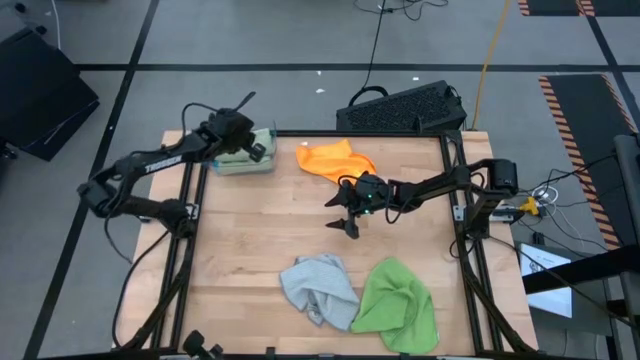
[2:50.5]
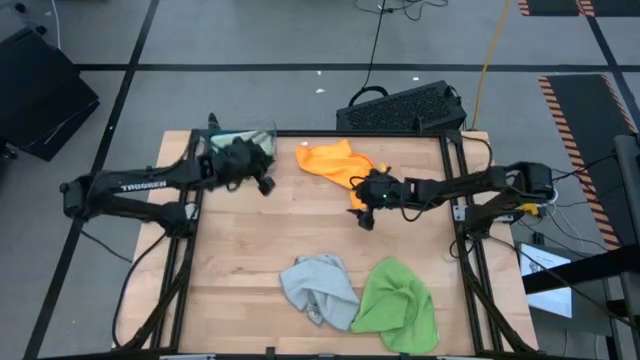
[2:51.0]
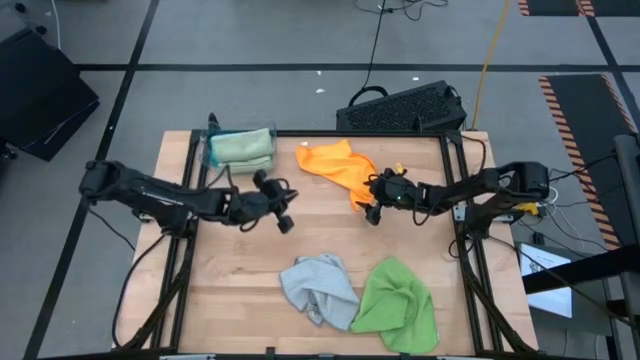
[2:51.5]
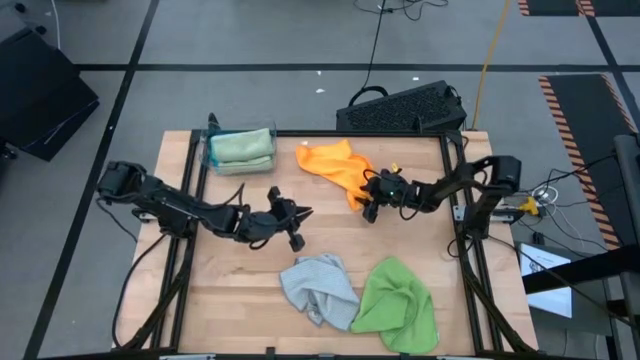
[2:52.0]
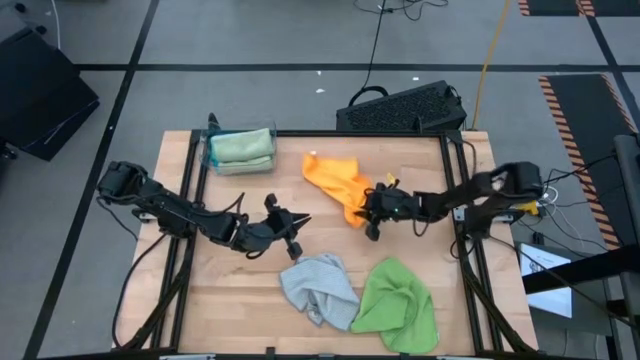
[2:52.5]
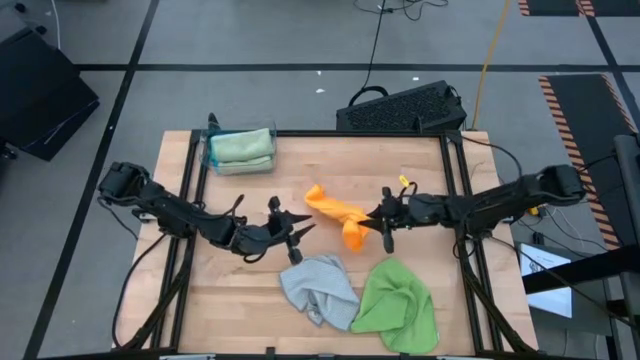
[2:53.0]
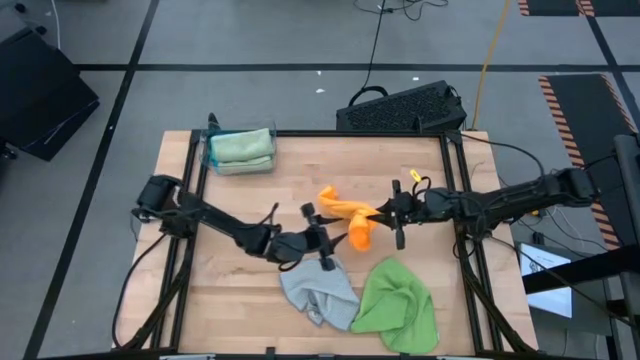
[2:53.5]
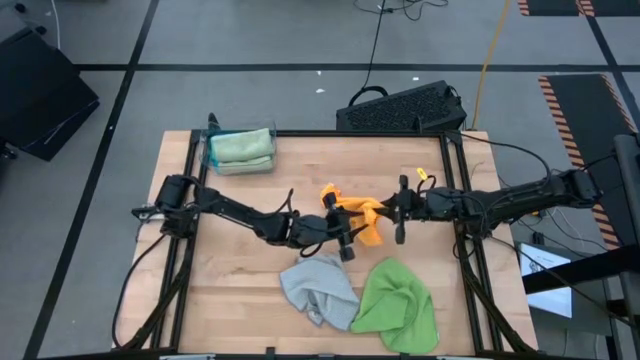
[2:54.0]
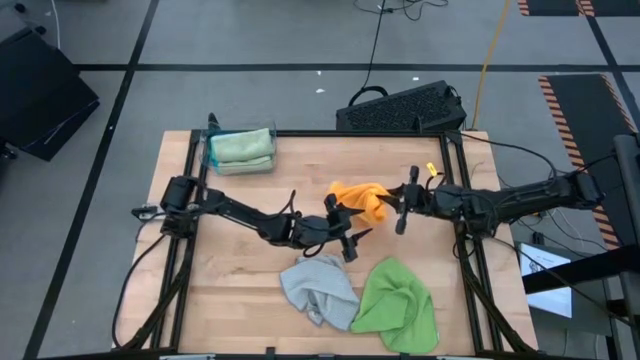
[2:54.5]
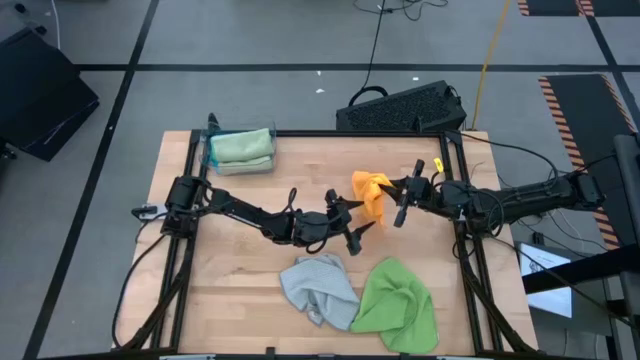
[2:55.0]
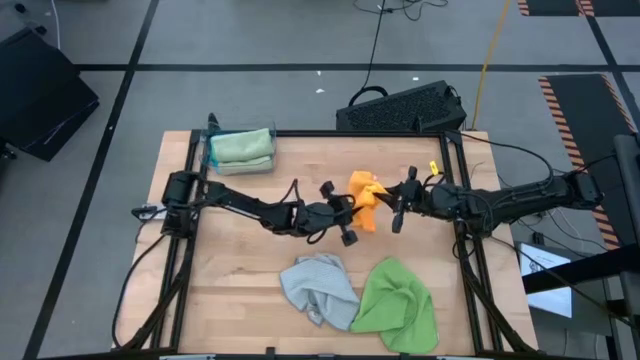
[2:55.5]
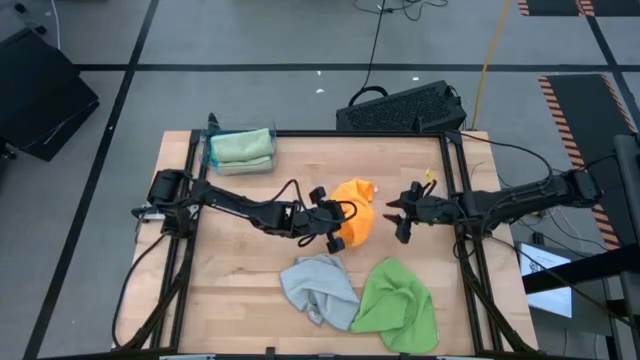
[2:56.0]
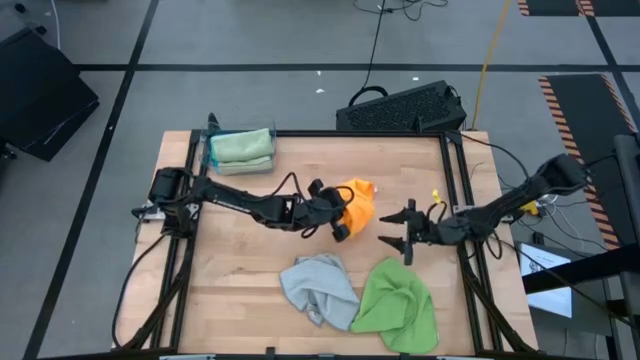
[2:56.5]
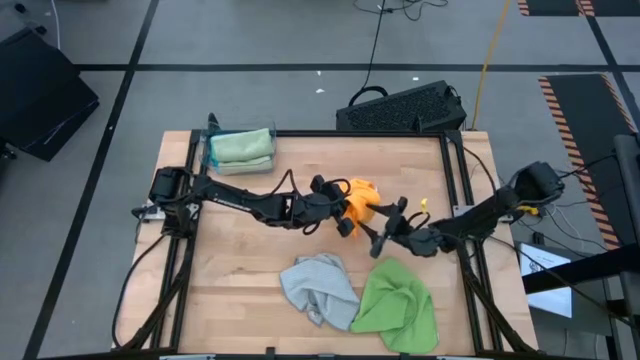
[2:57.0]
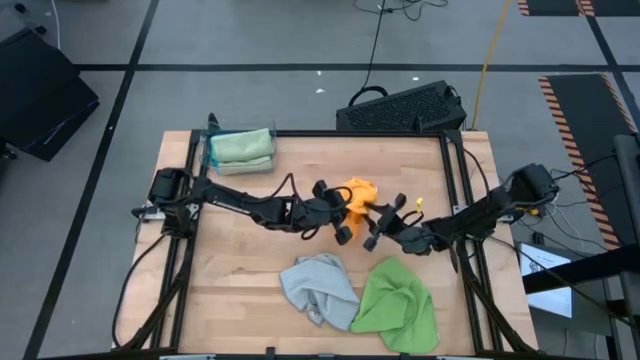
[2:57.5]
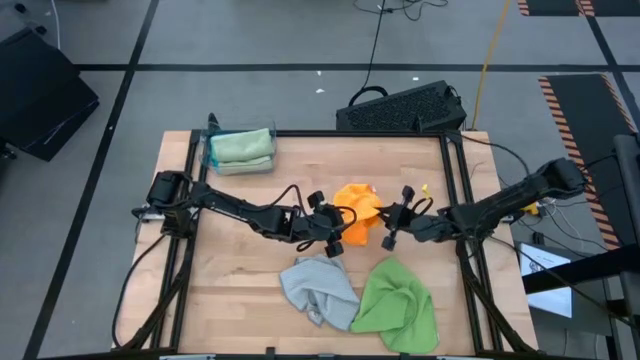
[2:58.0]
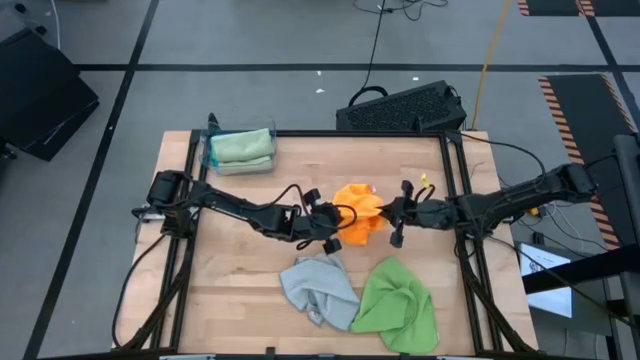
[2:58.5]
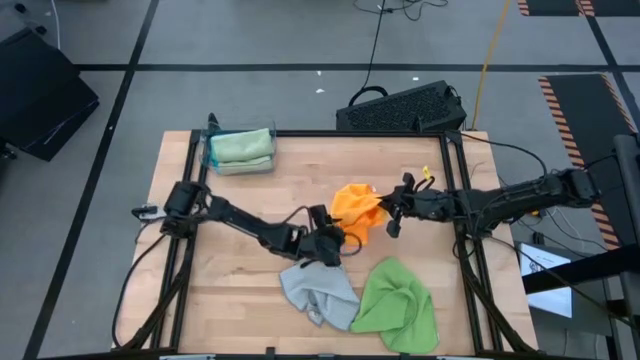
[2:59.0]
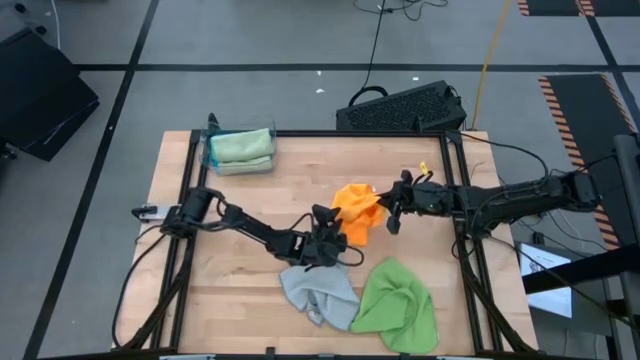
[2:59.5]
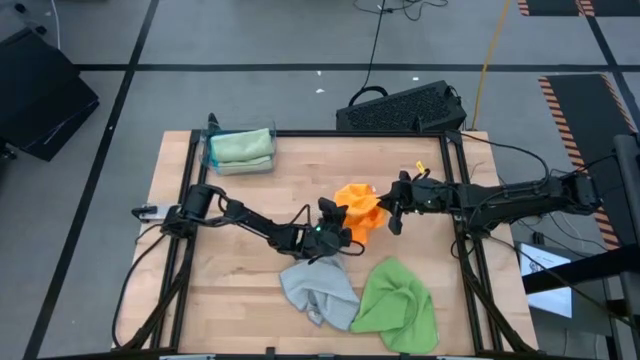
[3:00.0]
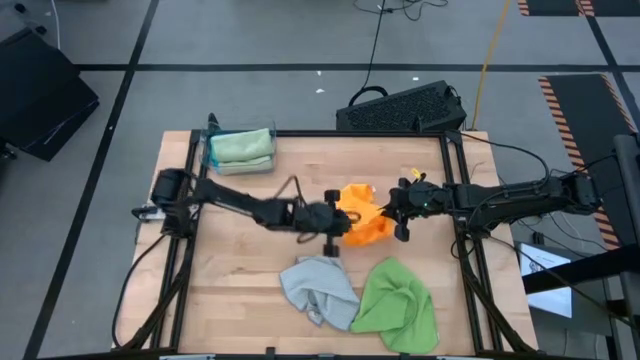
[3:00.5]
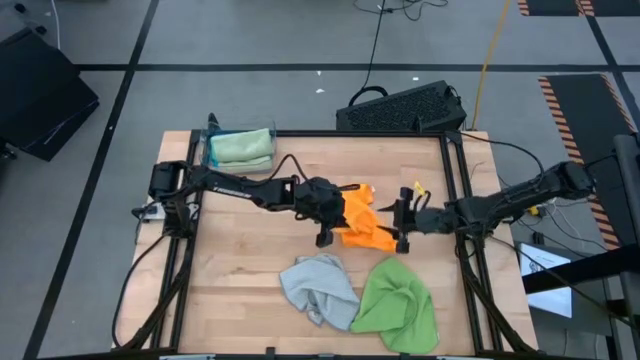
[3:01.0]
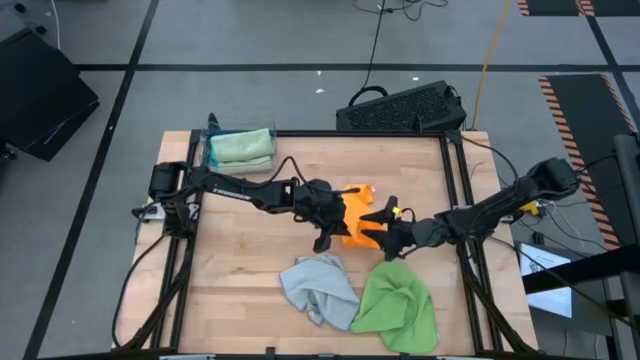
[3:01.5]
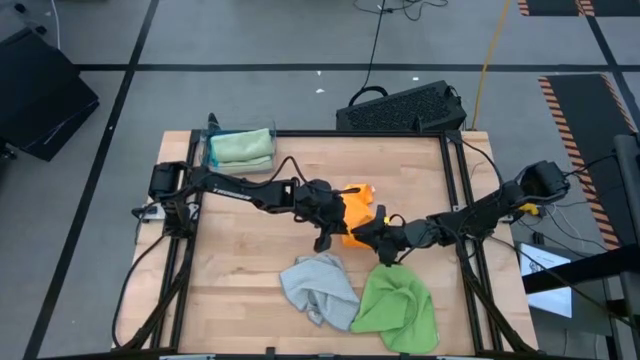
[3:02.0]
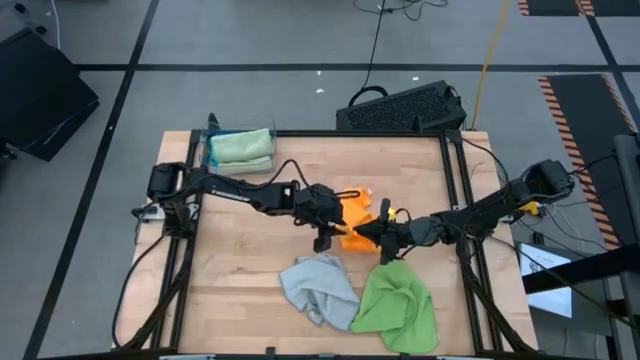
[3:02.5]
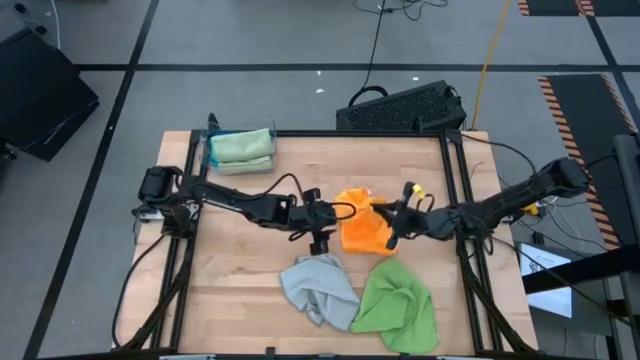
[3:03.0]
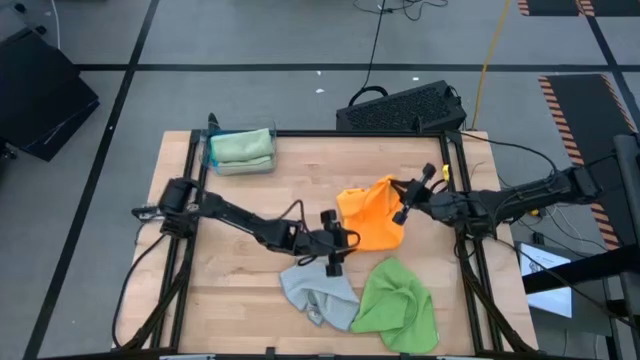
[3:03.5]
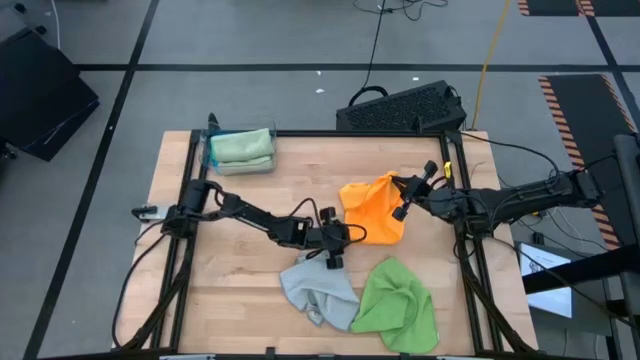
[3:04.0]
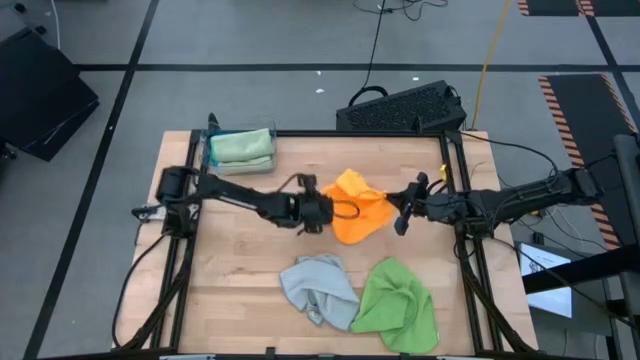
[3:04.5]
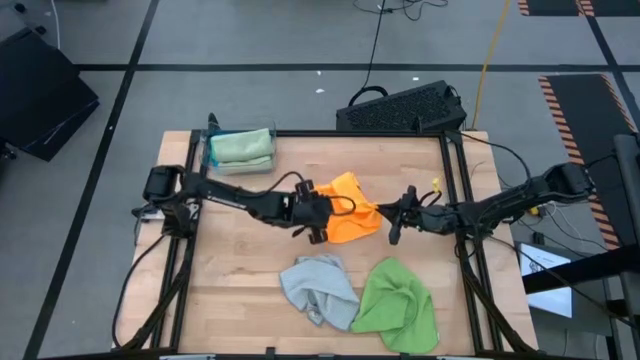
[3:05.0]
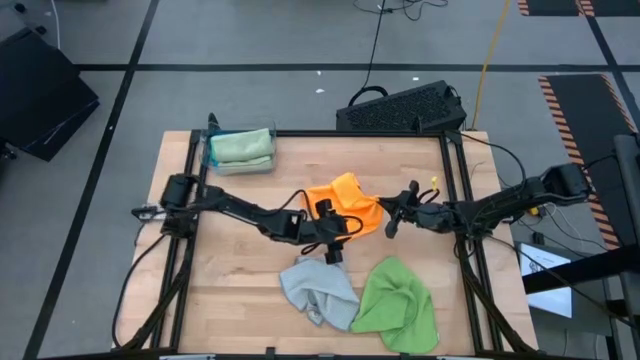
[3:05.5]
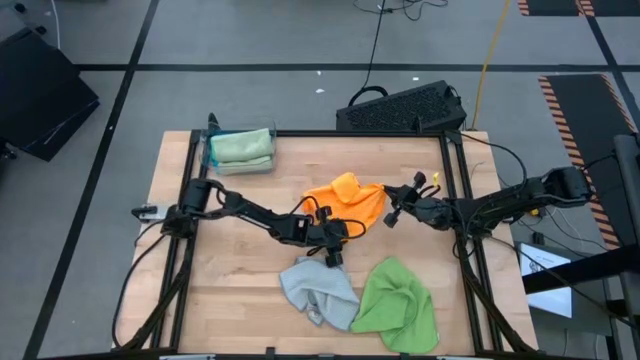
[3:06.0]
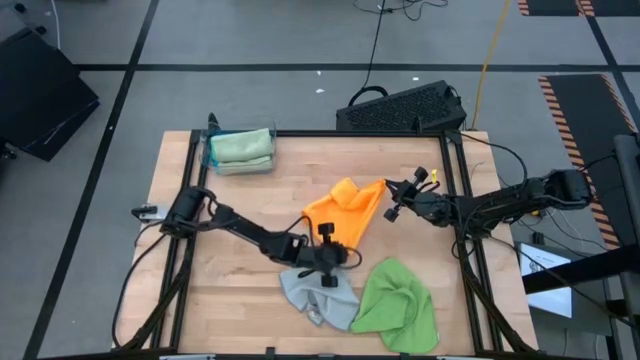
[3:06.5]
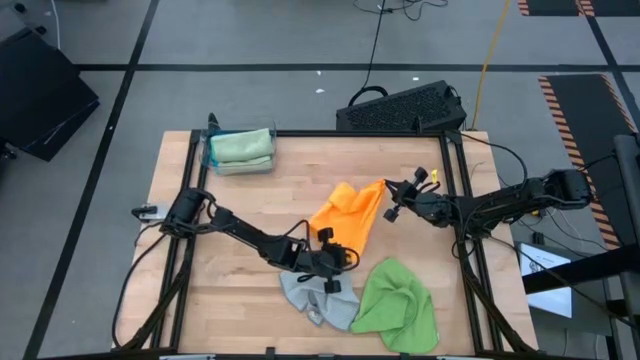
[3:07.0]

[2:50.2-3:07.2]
Task: Fold microfiber towels
Fold the orange microfiber cloth

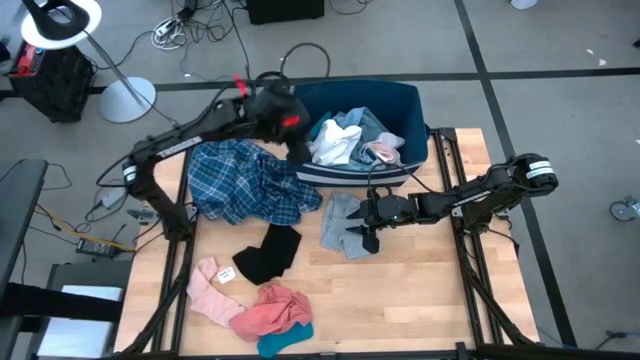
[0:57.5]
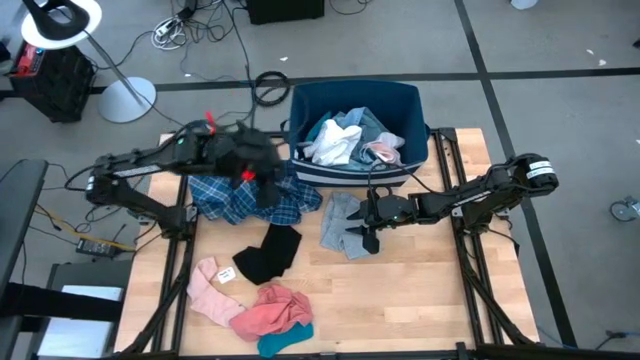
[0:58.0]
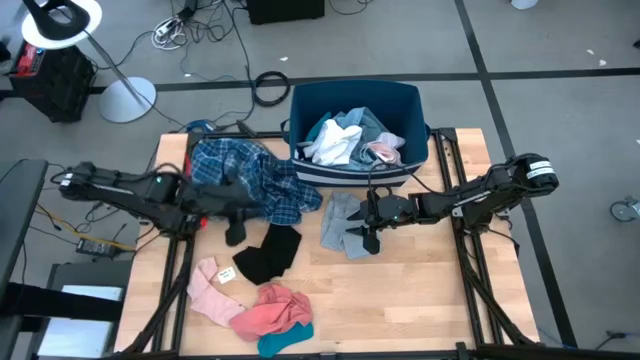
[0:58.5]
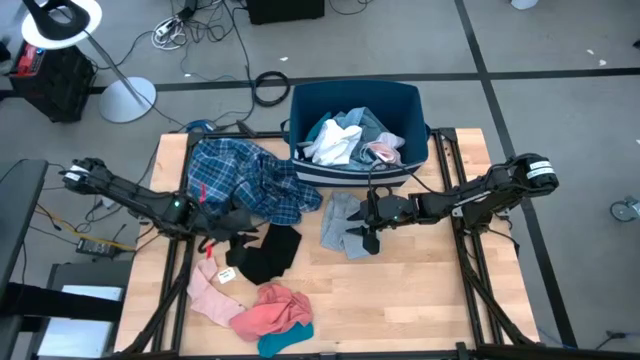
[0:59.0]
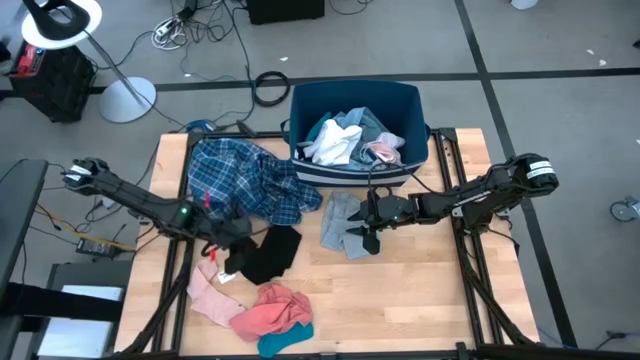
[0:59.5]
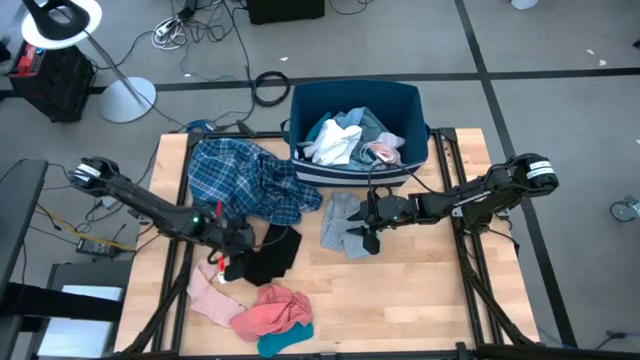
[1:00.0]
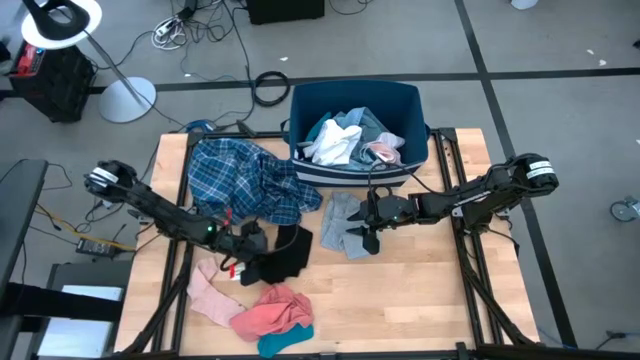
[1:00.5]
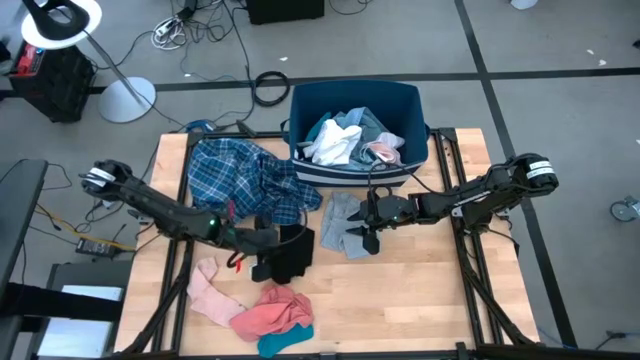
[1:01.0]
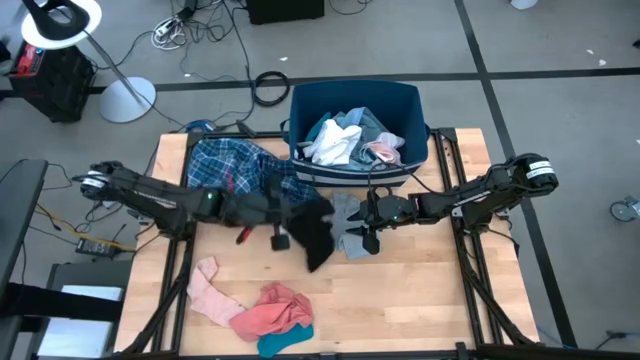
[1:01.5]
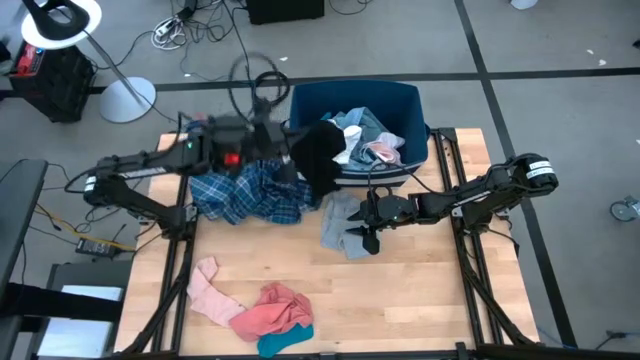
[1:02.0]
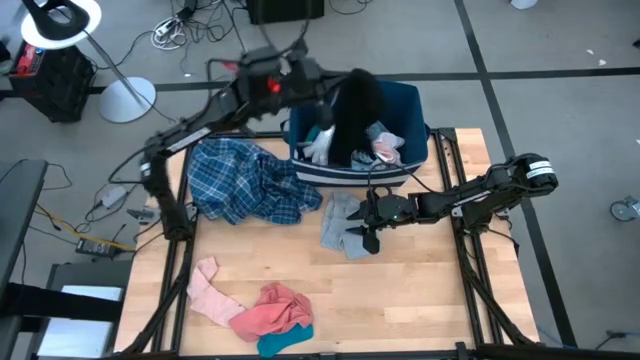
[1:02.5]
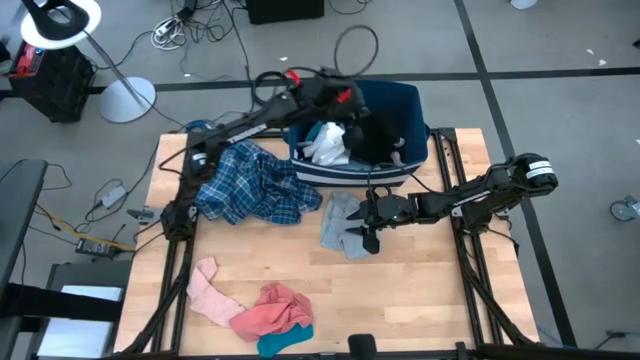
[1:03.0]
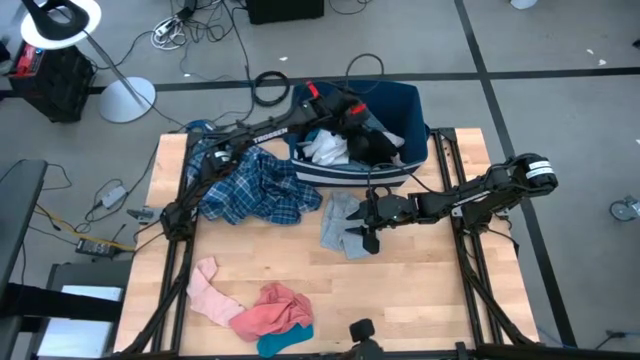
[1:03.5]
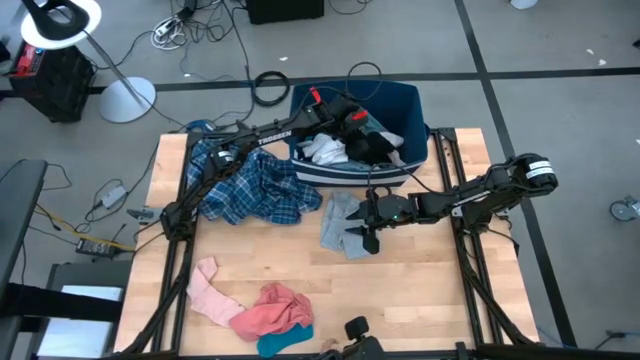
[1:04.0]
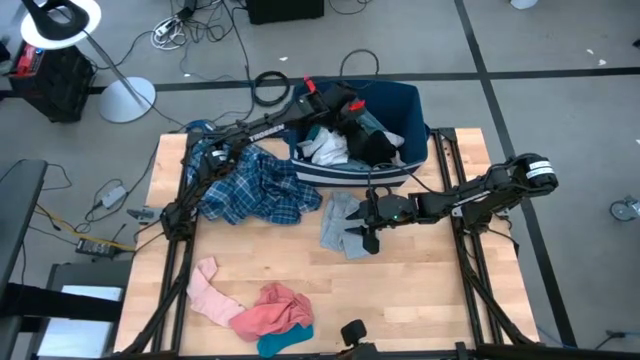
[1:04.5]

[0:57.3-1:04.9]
Task: Sort clothes
Put the black underwear into the blue bin
